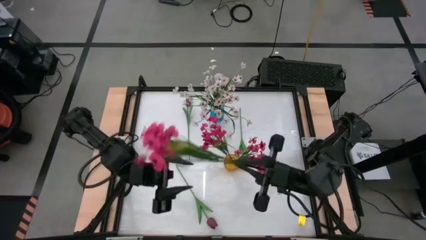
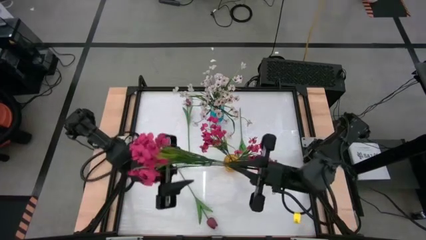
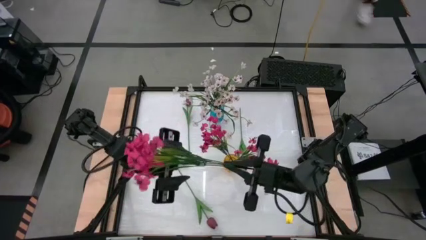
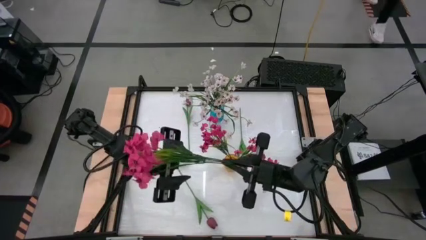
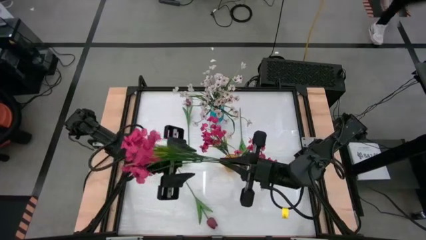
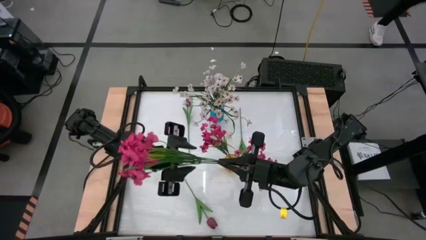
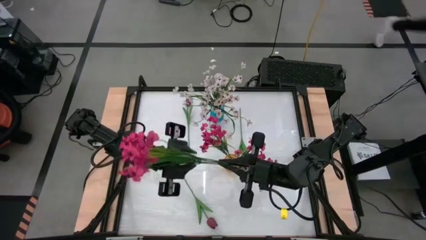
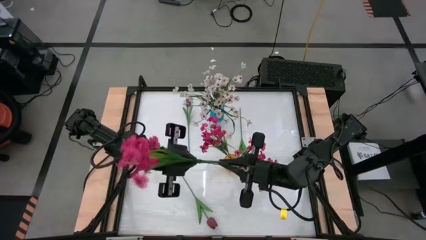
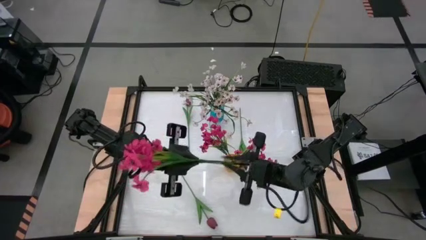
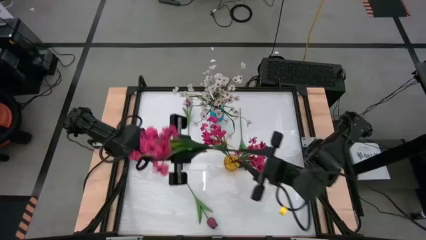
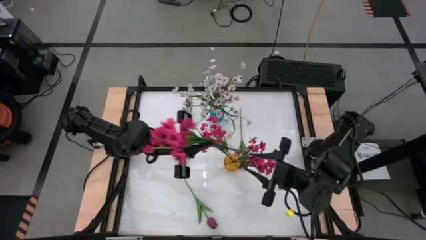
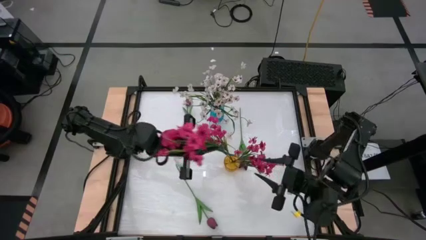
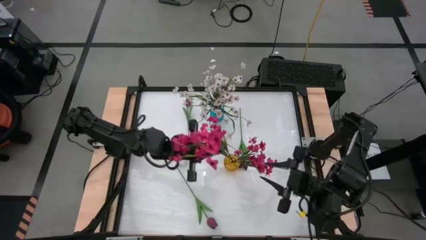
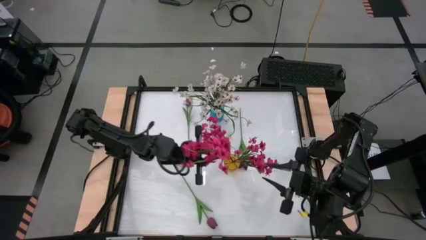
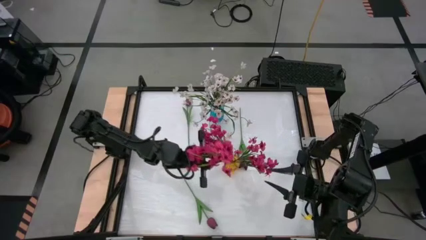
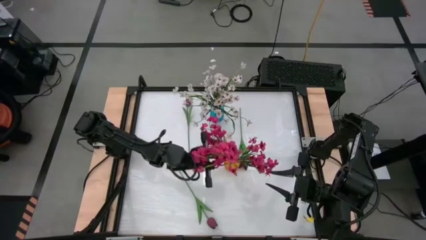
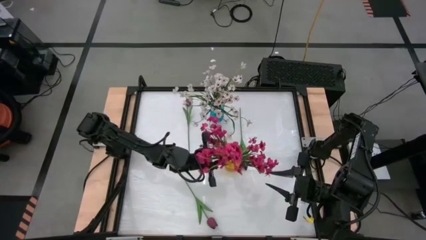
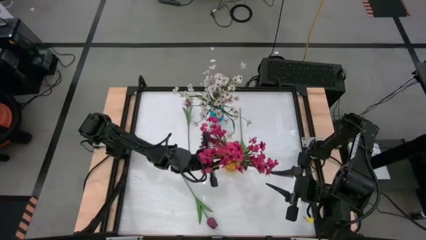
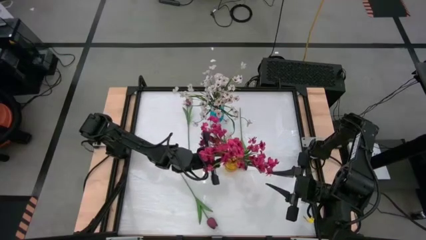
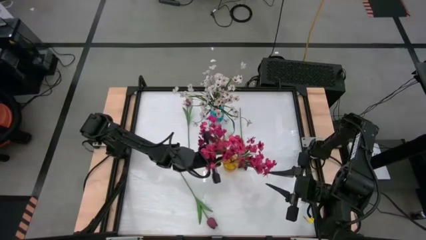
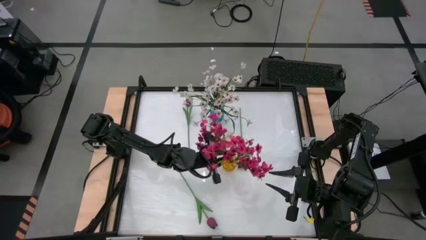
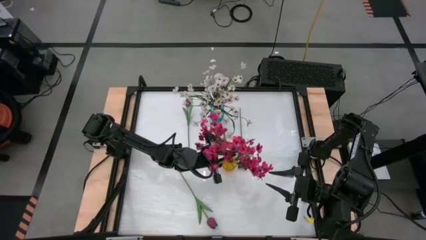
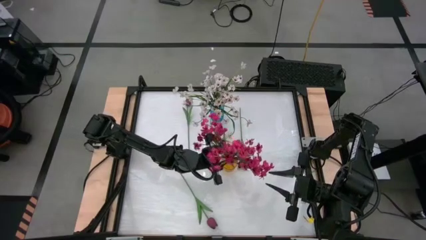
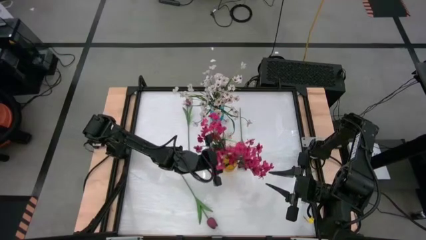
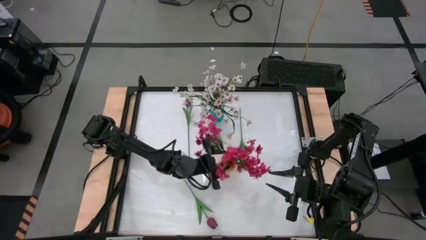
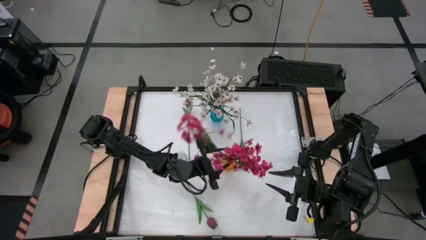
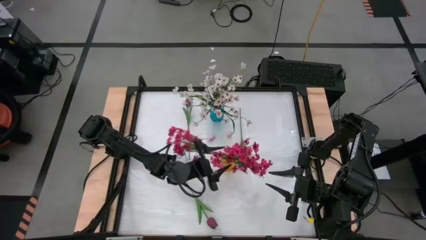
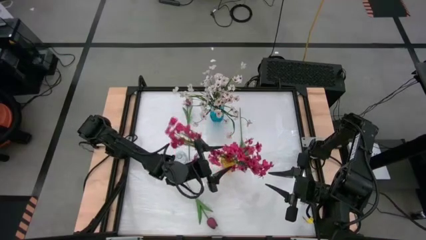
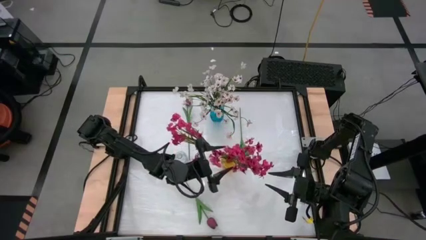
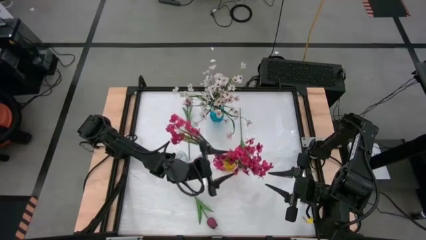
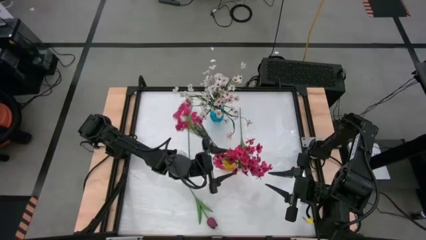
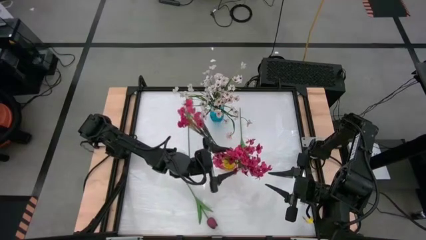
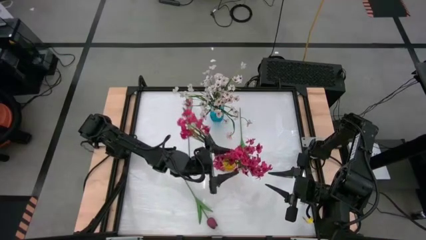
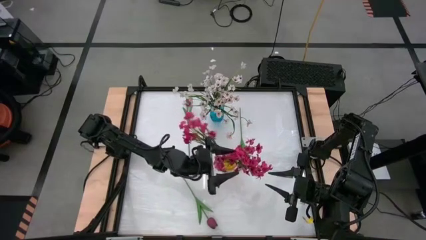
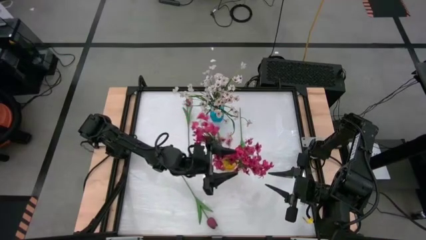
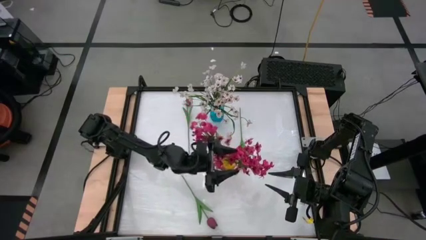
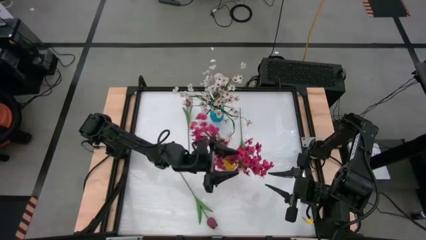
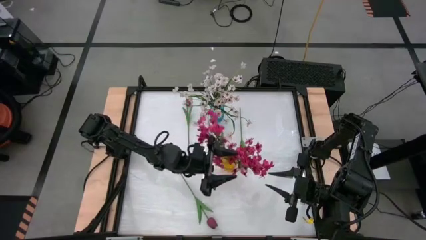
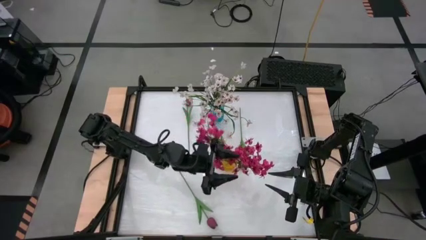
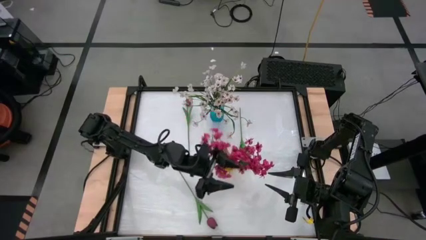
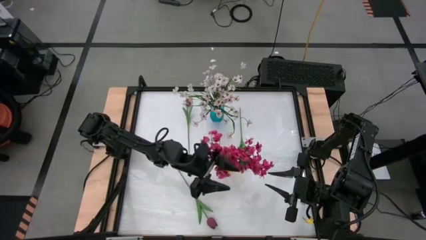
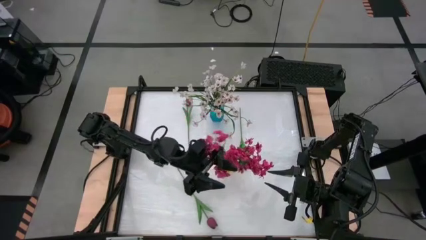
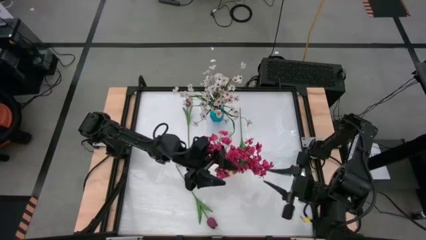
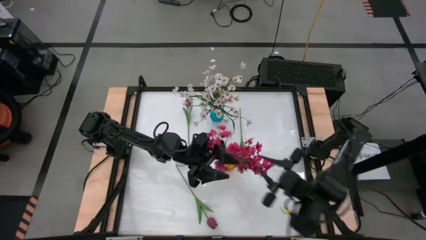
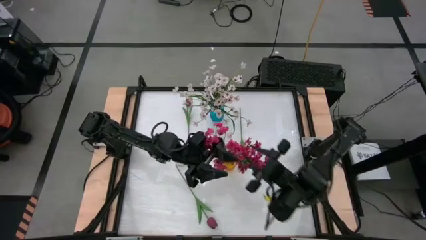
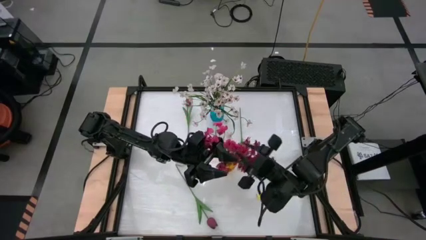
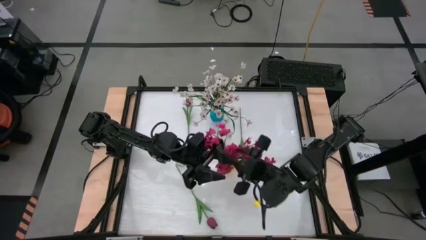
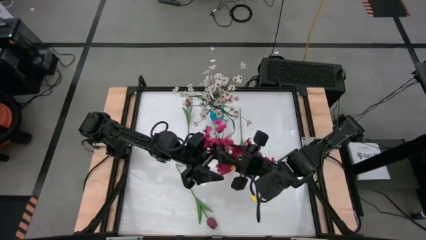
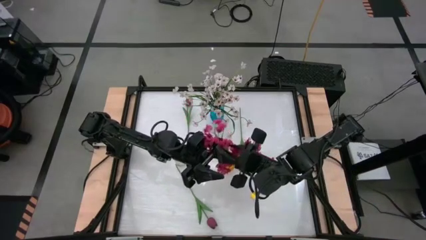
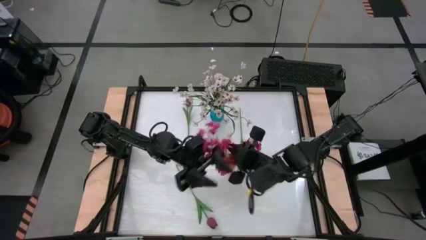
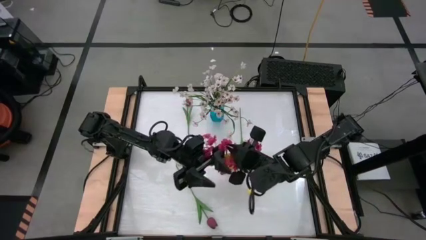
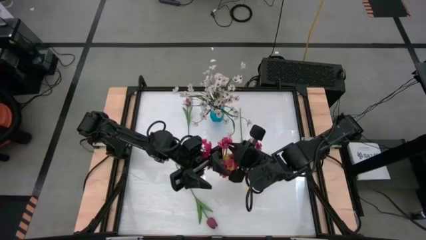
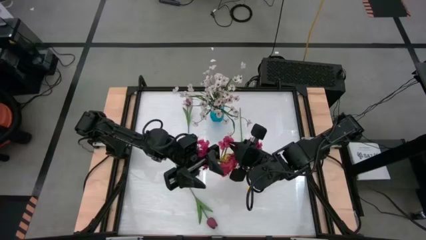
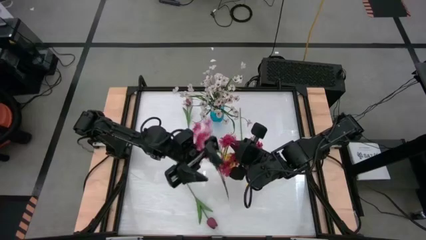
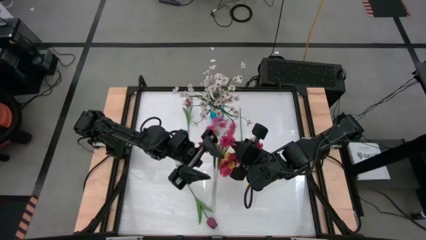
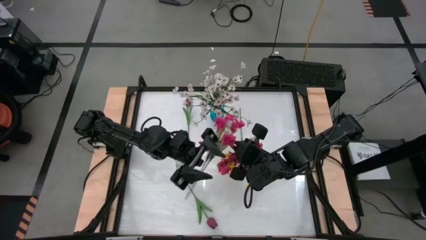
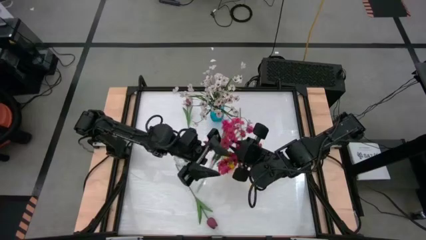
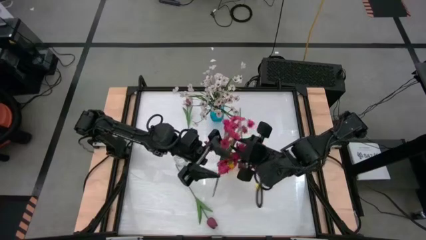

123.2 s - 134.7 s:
Task: Sort flowers into vase by color
Put the pink flowers into the yellow vase
